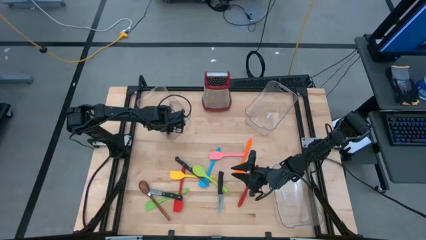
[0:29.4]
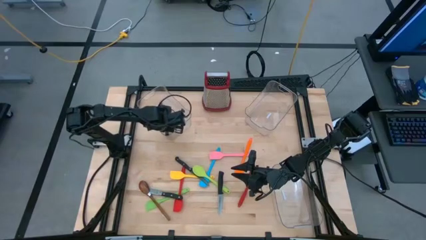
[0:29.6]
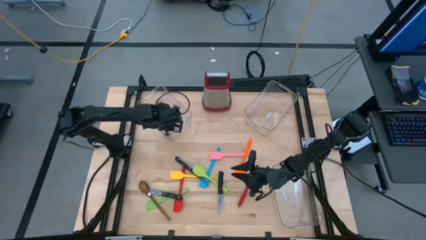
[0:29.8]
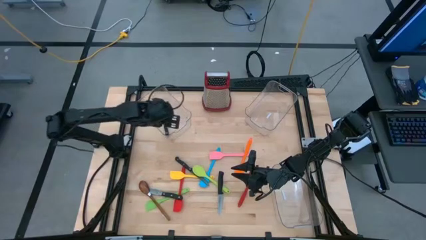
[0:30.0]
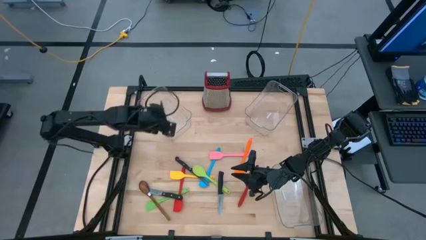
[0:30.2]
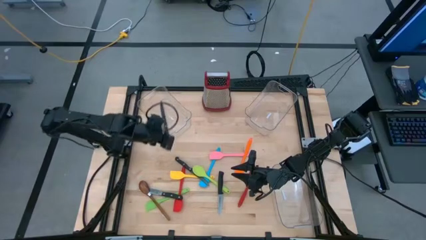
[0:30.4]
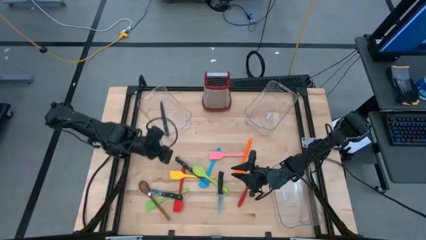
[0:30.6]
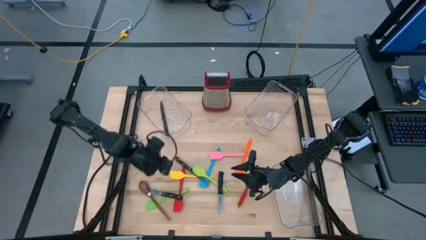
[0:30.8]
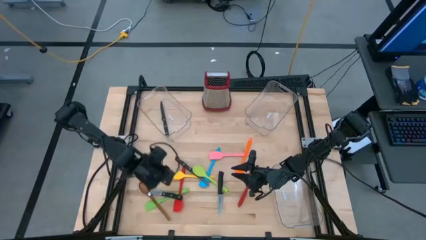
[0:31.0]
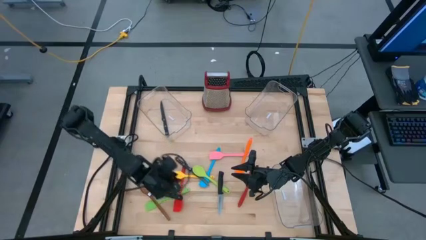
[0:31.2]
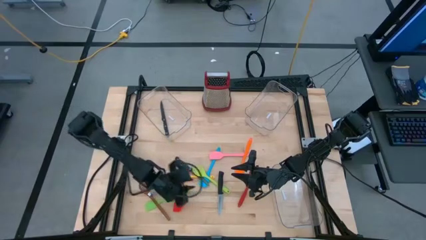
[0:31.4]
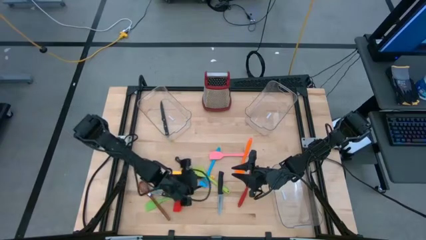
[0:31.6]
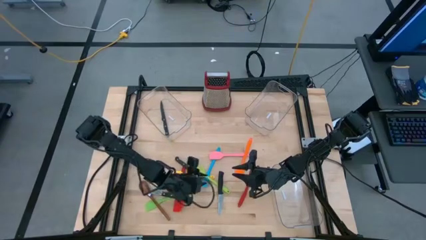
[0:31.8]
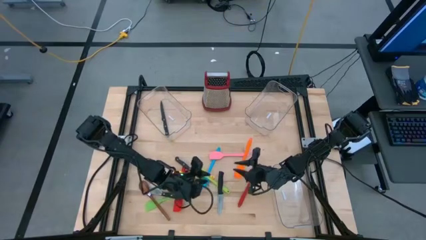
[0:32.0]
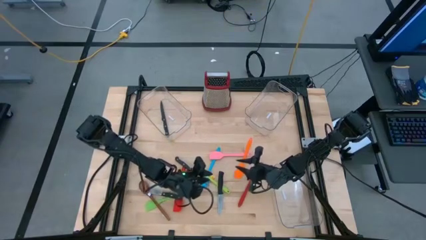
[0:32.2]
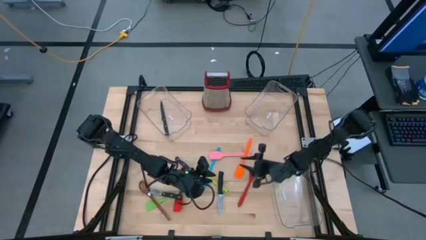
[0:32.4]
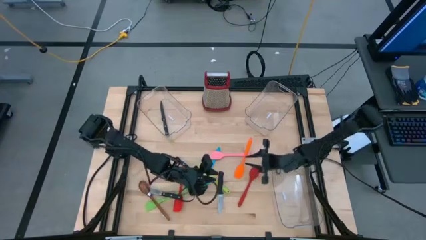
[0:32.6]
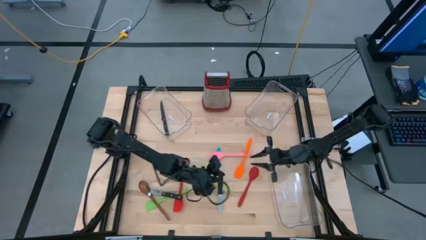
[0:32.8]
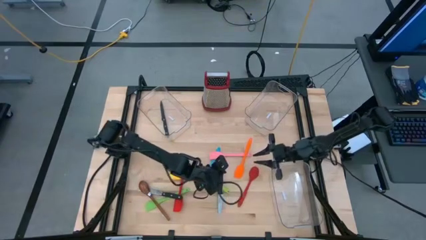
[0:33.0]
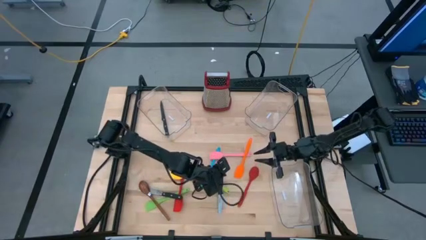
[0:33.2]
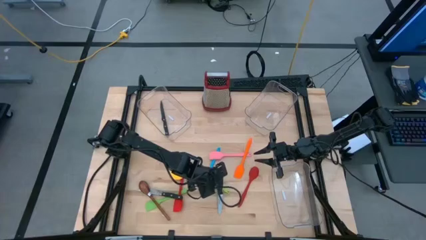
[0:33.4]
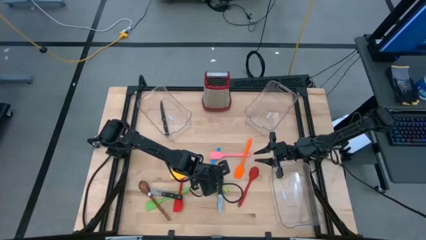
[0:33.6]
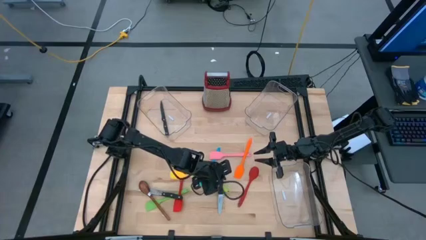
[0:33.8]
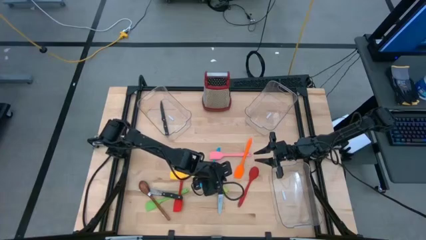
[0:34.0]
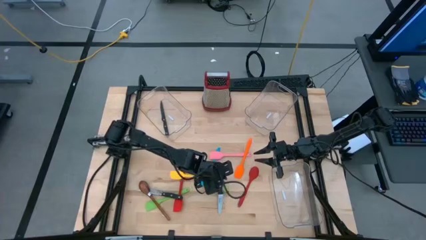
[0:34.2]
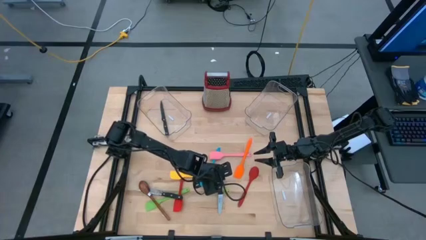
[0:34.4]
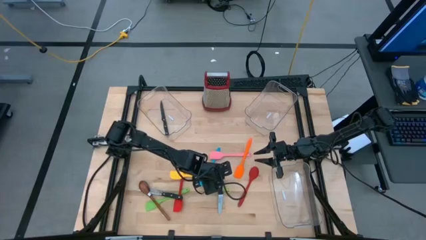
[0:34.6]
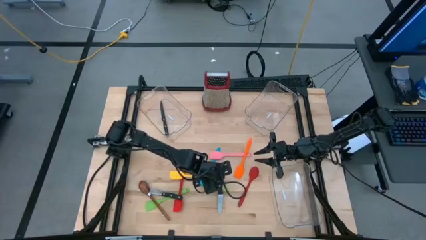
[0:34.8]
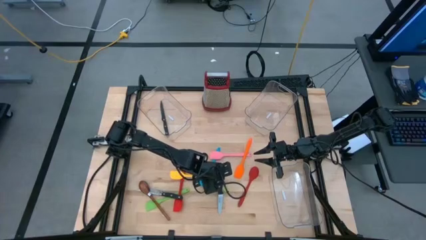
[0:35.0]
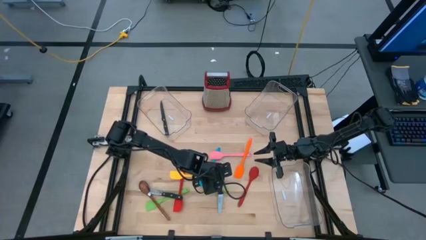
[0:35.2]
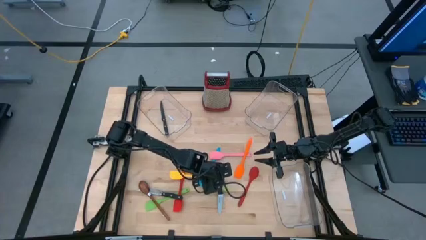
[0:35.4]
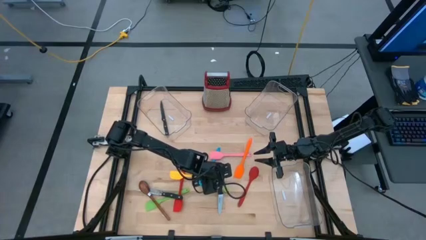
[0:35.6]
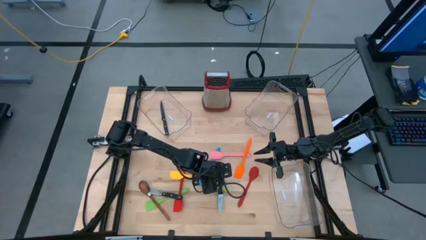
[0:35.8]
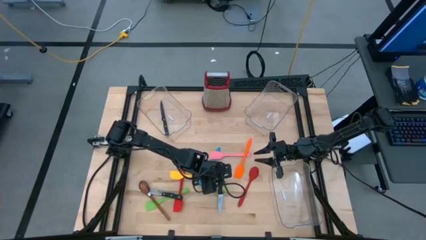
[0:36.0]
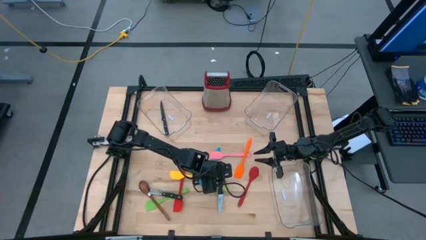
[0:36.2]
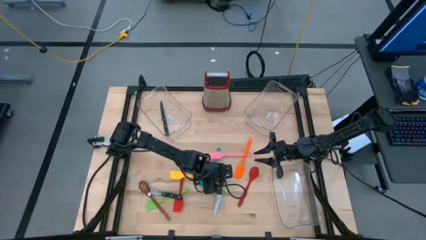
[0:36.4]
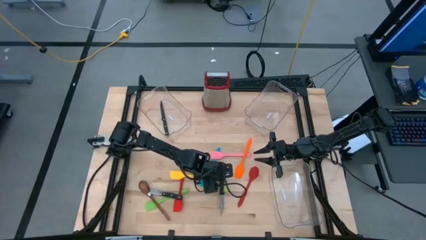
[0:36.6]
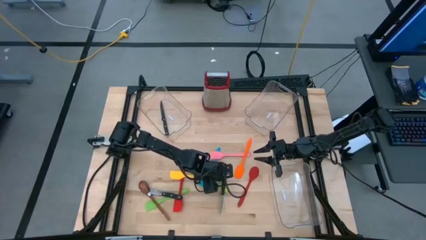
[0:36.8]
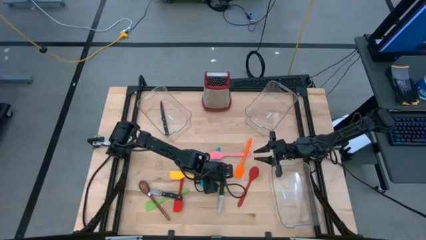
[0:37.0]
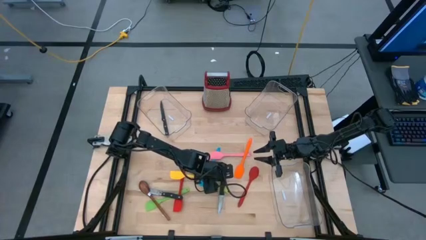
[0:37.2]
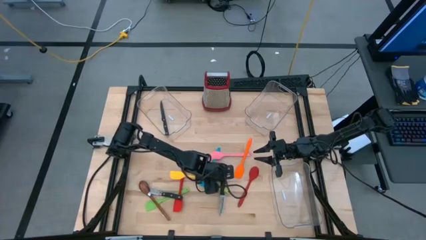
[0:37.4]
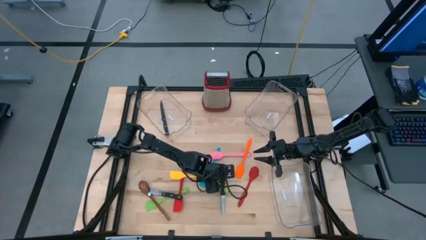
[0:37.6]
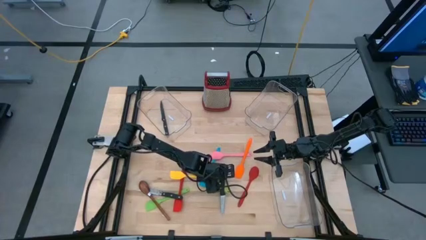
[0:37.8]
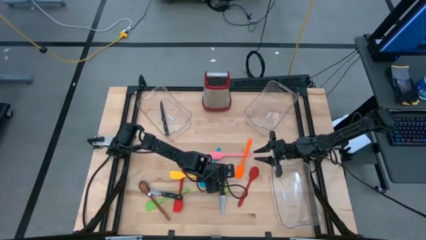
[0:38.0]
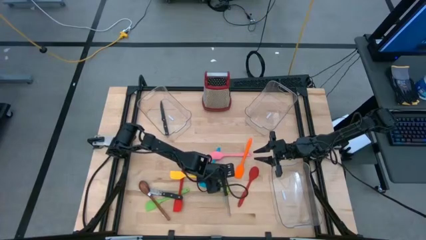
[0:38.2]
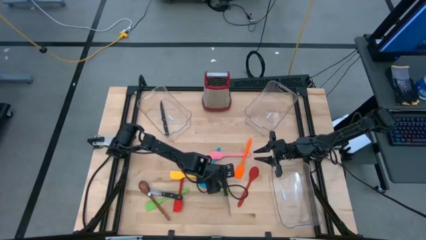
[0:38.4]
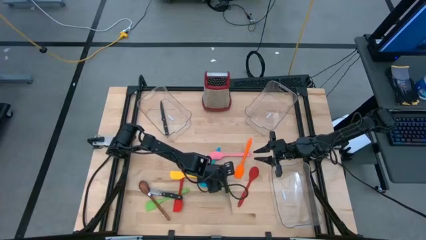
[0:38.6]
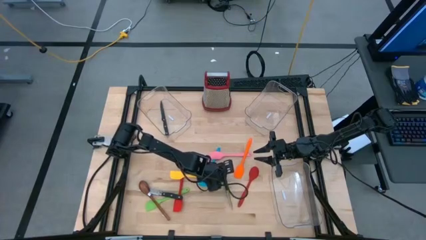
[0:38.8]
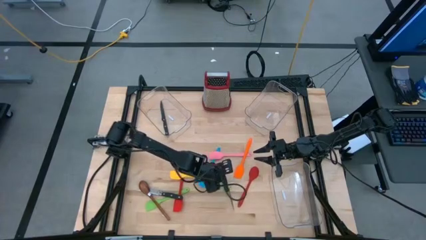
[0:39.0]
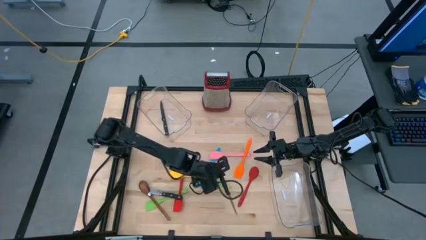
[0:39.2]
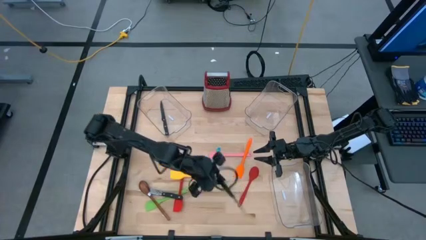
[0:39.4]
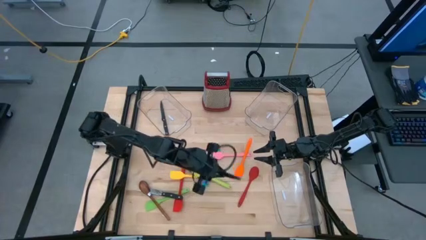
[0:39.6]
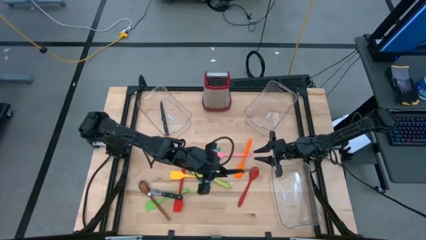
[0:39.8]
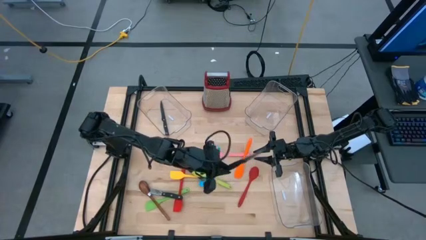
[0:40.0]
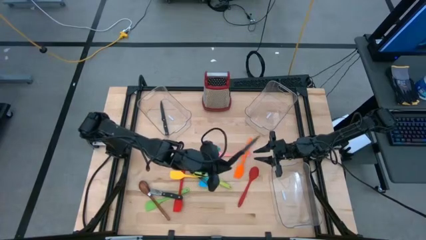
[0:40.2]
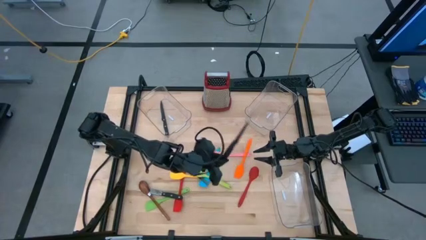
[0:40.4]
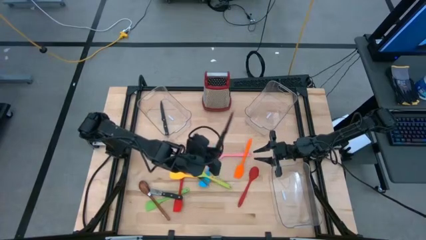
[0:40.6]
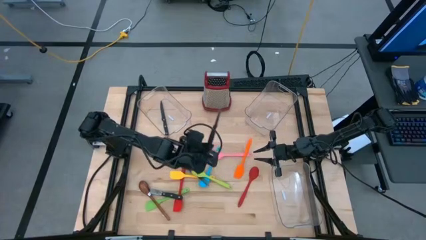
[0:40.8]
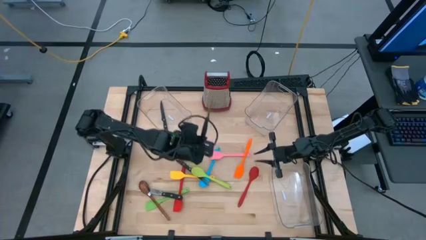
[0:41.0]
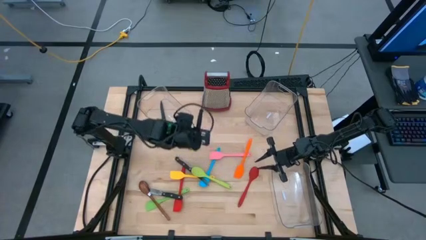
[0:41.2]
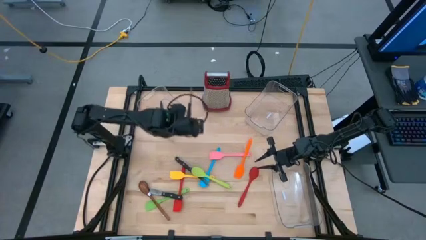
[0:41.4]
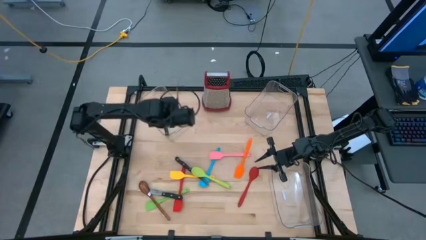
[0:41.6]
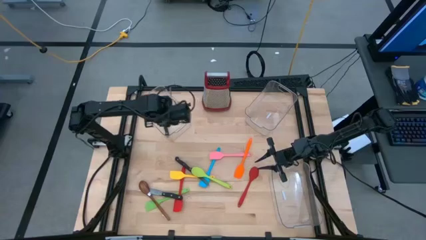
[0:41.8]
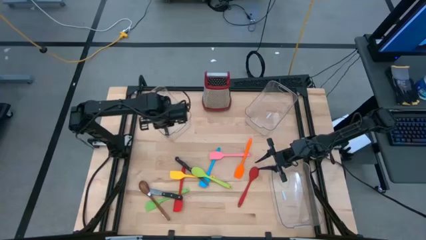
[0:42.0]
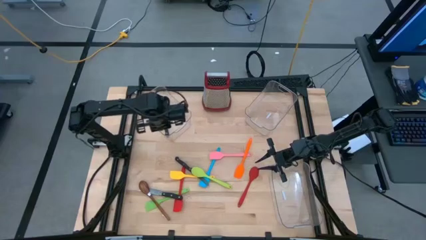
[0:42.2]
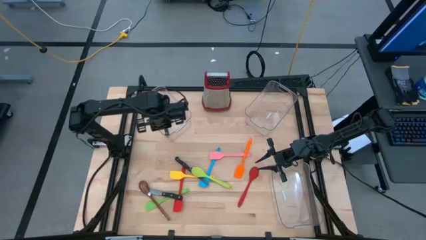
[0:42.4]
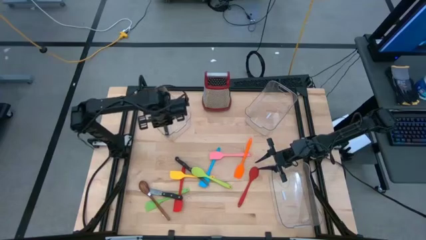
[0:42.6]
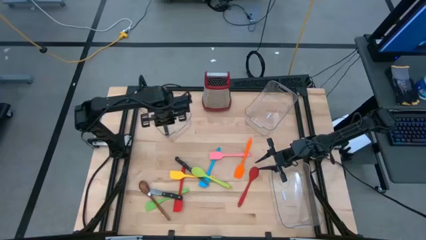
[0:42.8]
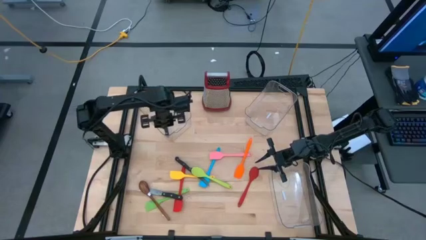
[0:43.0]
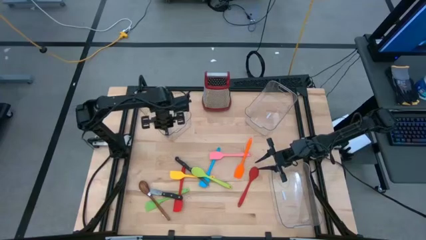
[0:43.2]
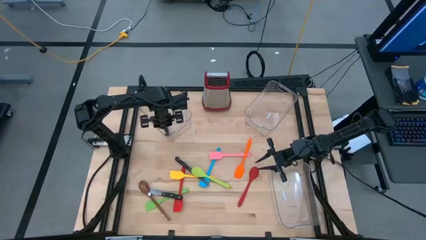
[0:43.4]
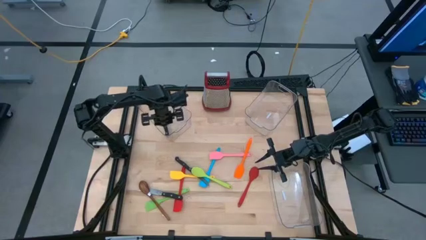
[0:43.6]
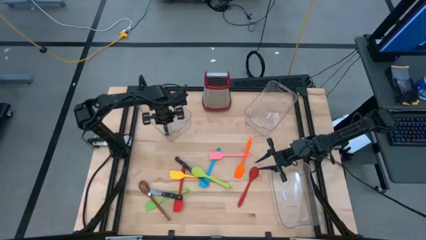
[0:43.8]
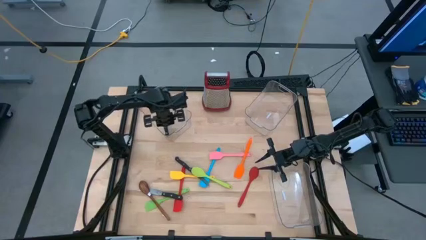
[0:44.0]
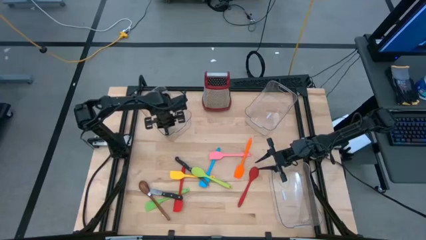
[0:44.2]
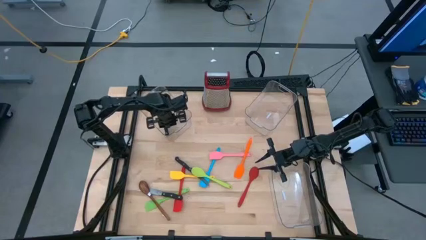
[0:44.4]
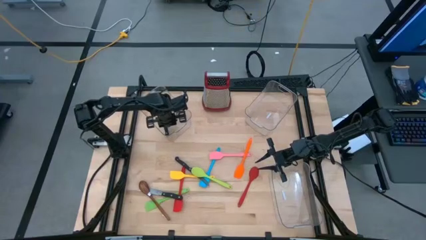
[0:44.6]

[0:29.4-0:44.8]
Task: Pick & Place Kitchen Items
Put the right silver knife into the top left transparent bin
